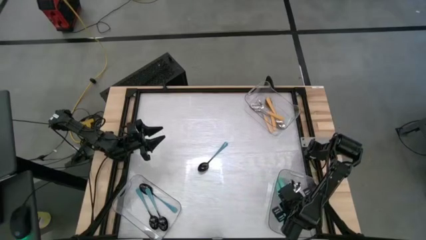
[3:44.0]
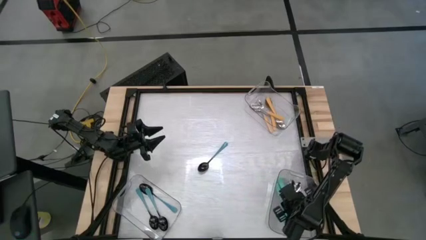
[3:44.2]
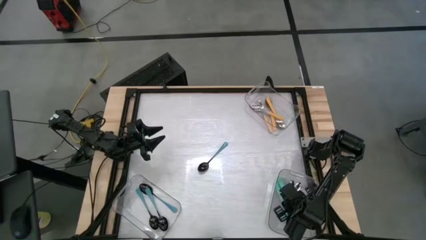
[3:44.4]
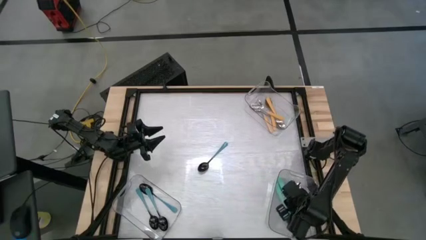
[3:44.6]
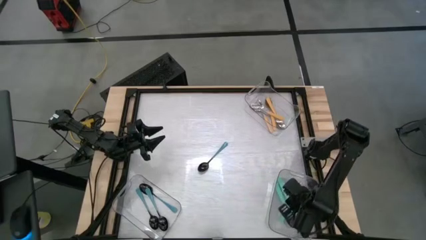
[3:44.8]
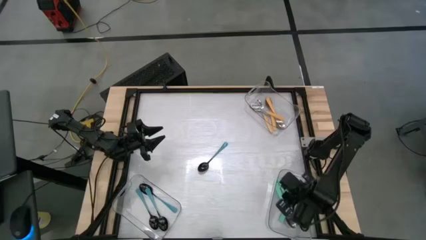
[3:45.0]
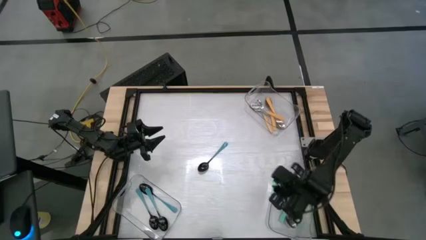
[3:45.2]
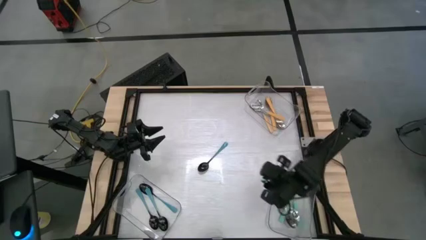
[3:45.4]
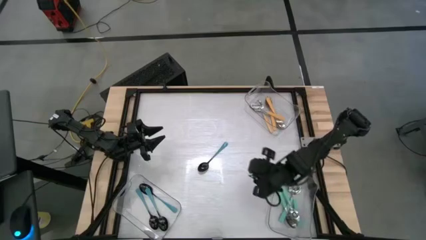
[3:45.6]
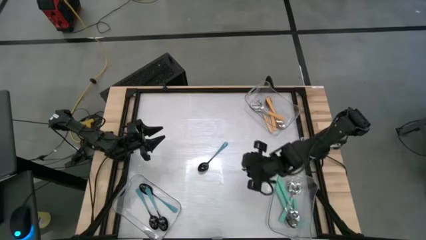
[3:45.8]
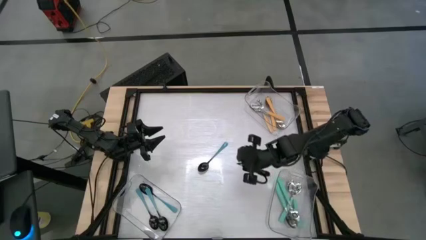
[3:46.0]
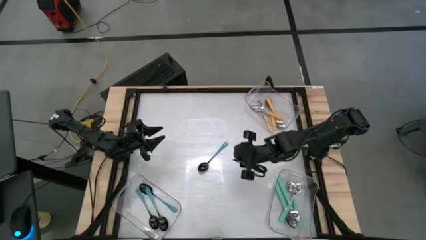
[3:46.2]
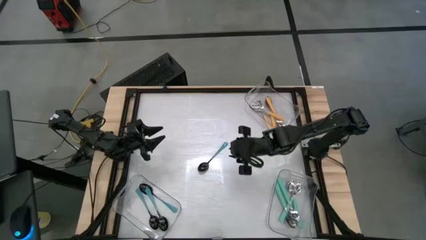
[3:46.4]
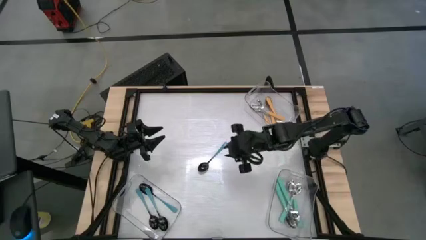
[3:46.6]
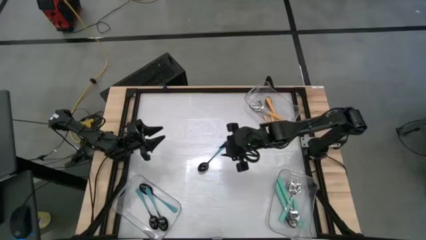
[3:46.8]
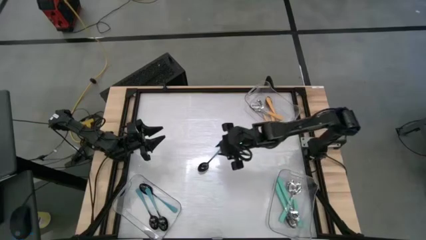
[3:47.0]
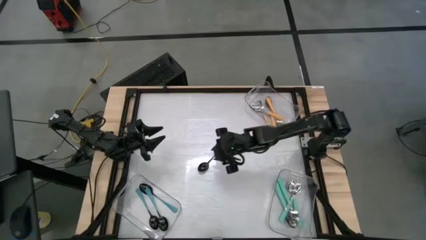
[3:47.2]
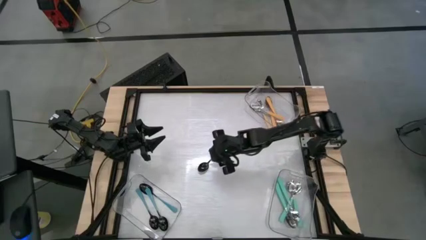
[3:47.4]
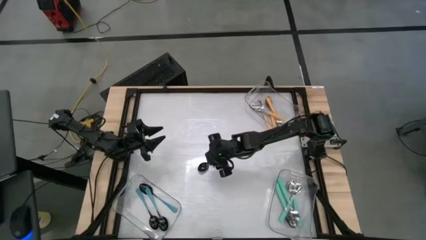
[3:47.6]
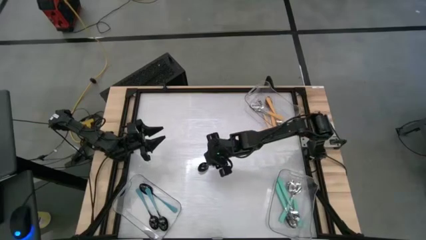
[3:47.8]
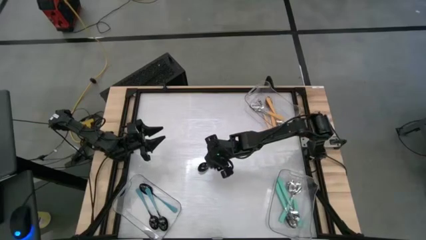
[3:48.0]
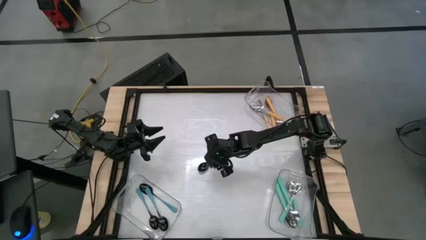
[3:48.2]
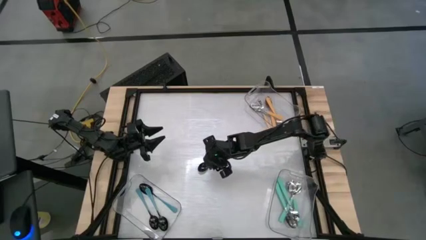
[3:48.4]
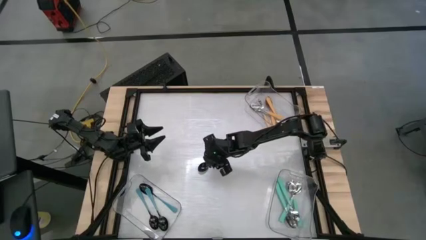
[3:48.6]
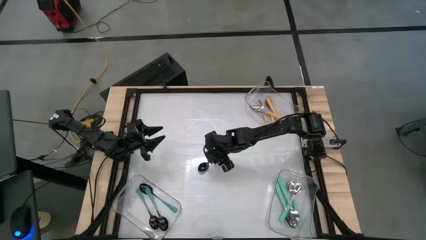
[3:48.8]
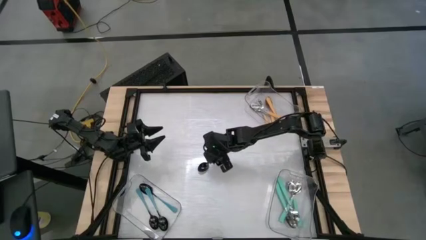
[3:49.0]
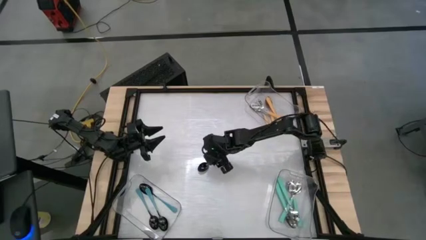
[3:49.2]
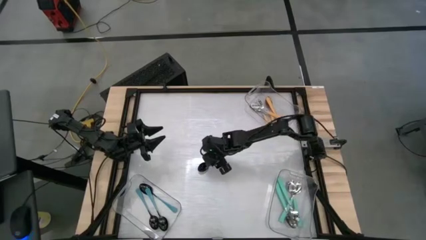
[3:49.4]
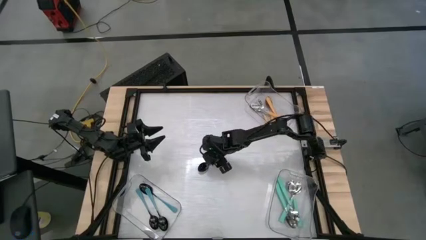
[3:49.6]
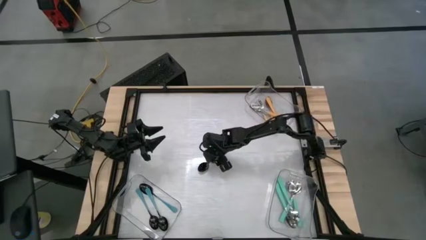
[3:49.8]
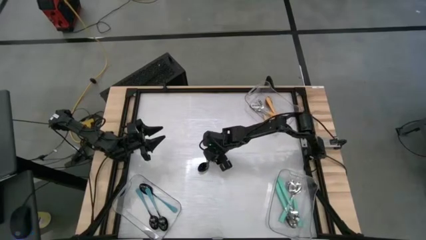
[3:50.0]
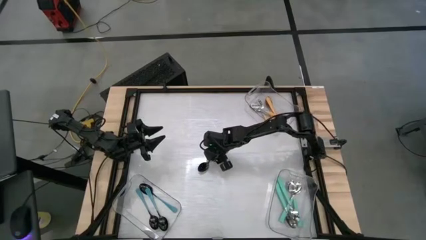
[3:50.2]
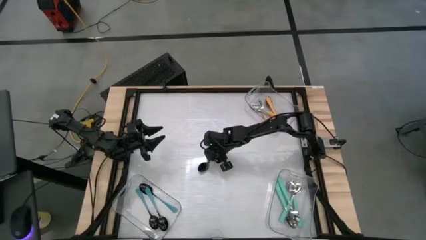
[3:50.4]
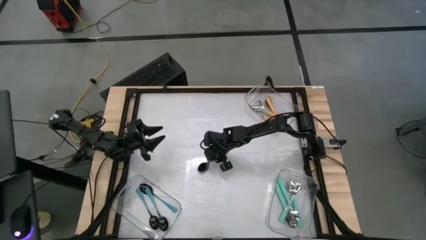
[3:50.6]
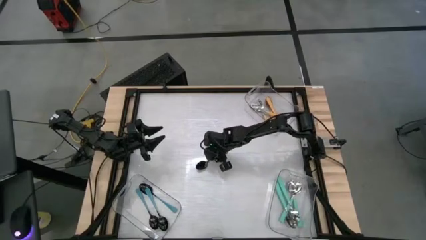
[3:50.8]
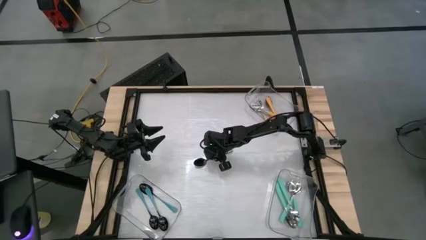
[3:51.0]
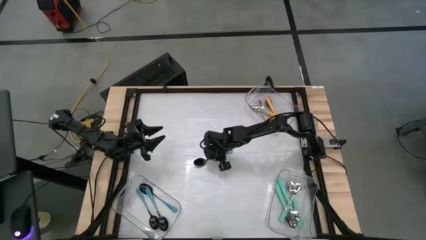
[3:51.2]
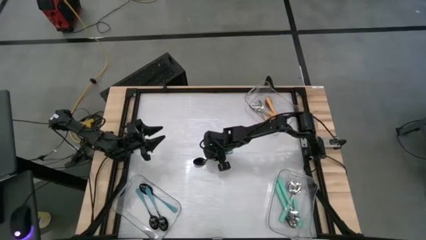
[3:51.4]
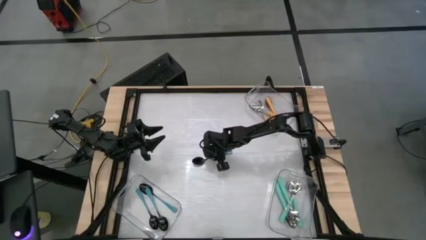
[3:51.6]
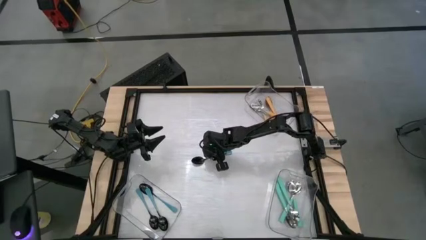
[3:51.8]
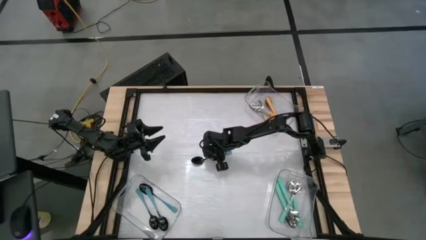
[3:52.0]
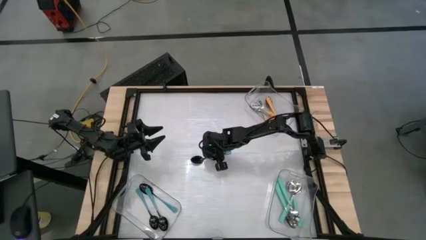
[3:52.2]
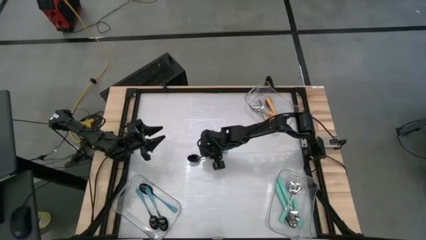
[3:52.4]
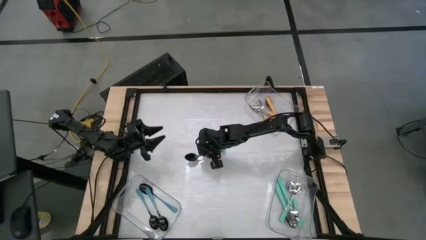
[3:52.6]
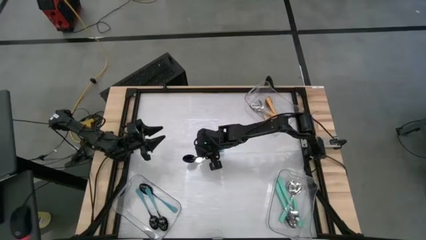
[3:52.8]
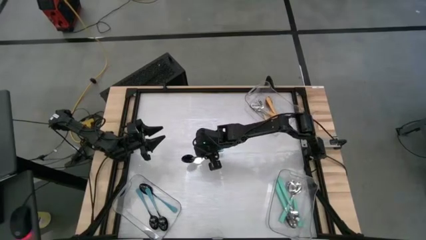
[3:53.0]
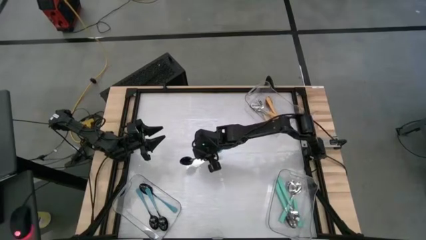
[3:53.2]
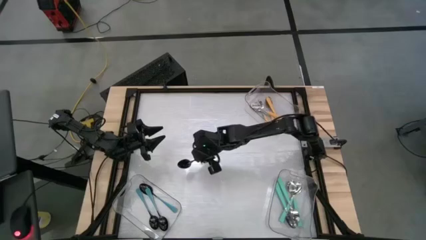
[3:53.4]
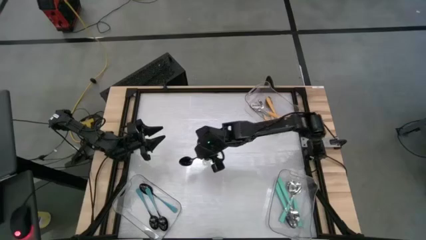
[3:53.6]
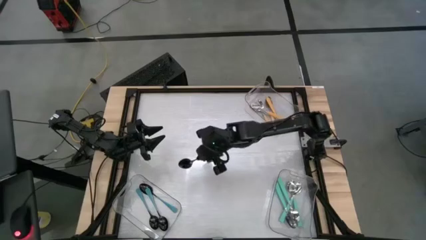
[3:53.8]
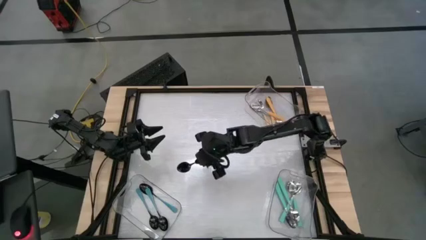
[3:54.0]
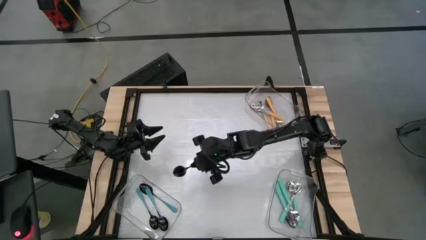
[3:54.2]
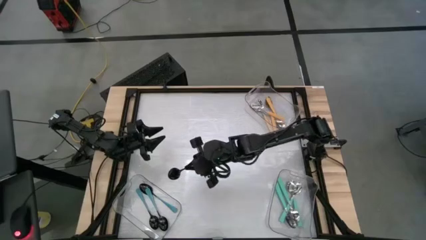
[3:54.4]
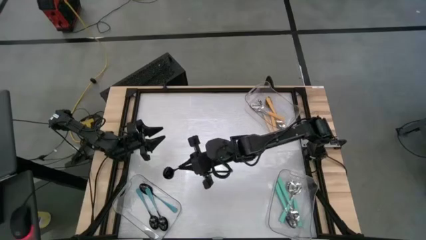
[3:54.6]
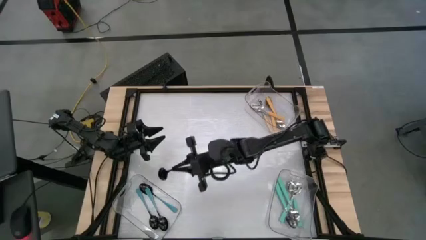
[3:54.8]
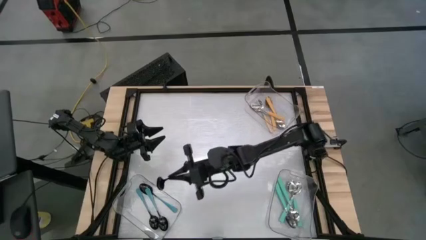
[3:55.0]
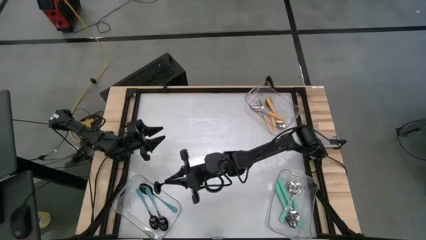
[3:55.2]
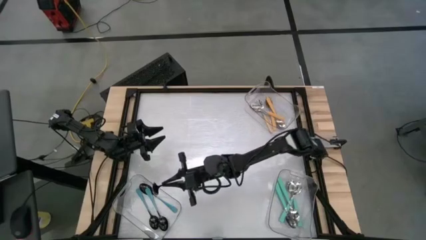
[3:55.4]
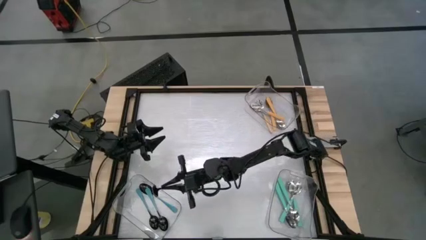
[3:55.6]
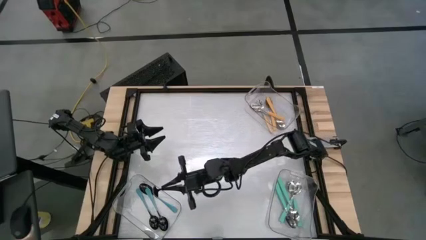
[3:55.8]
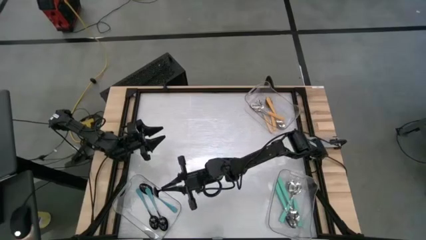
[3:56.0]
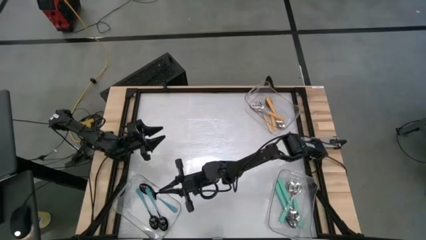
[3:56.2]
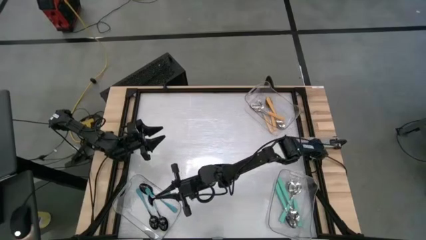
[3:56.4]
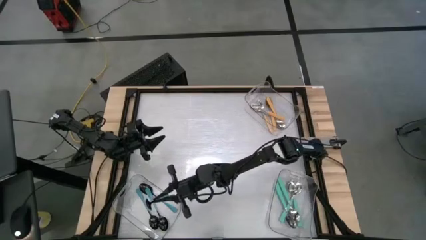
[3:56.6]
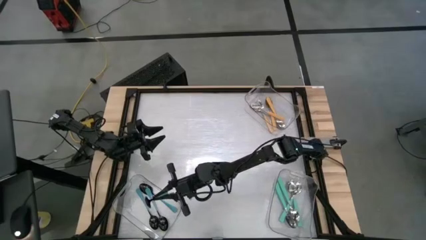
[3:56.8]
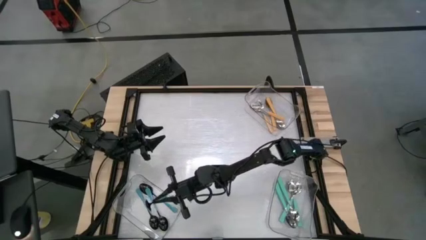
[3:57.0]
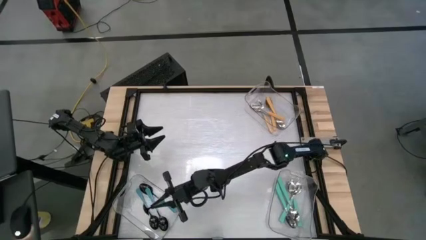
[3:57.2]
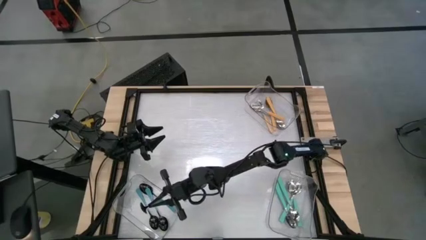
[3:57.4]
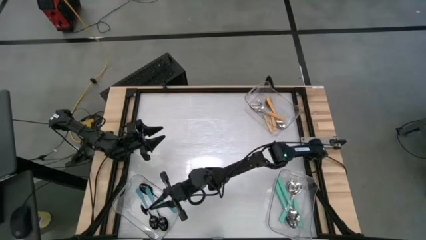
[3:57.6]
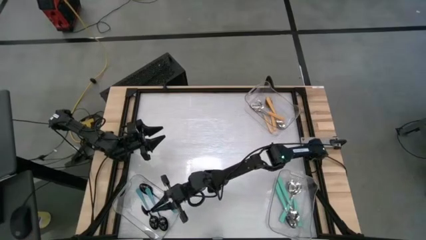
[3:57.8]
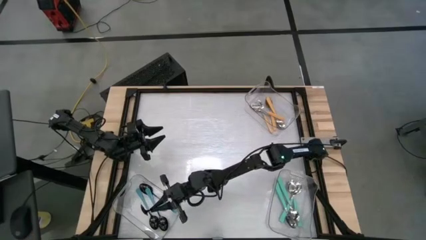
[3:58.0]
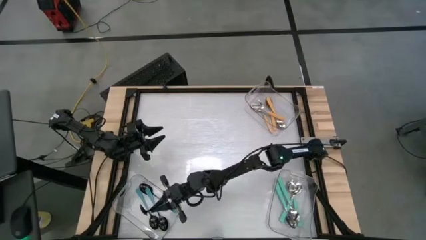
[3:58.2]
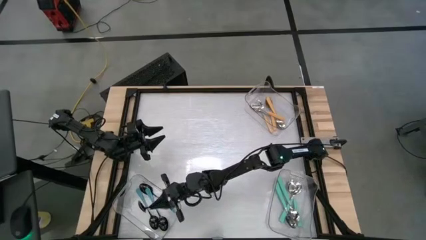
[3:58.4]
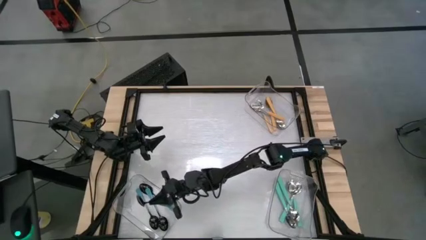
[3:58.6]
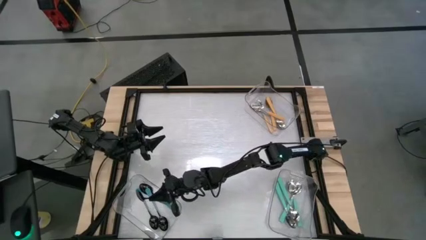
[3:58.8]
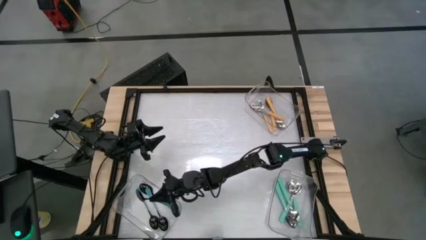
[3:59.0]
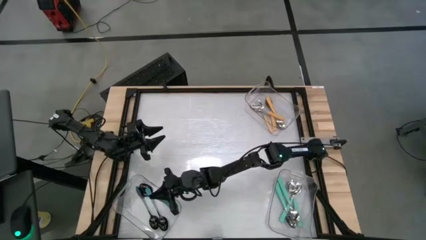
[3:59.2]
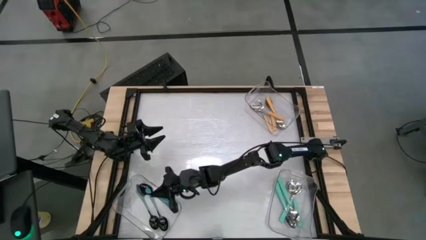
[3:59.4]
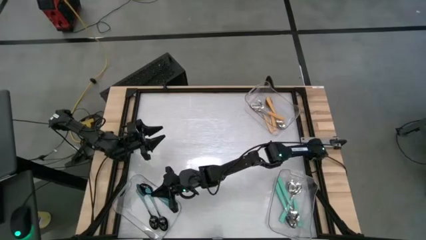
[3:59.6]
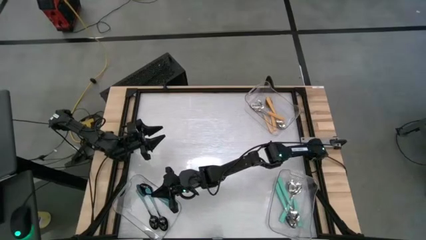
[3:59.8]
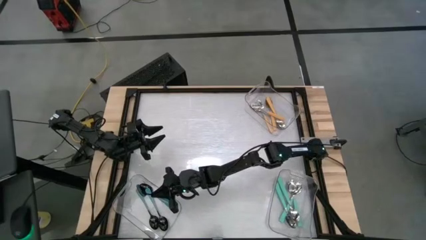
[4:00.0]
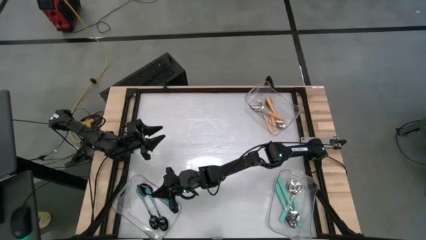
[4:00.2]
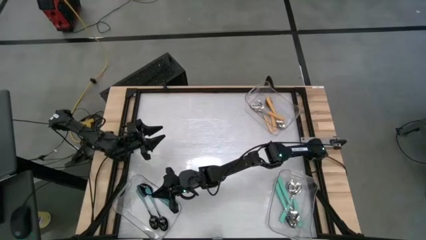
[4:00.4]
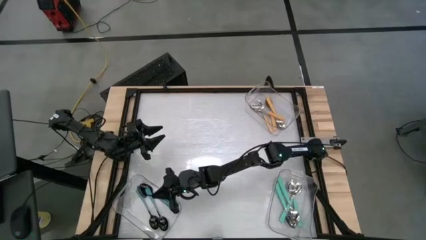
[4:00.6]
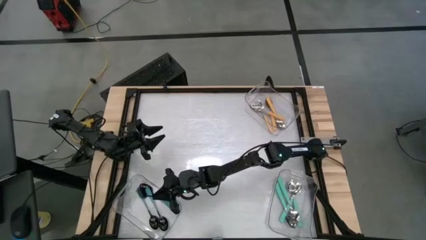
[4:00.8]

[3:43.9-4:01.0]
Task: Sort silverware by color (type)
Put the blue spoon into the bottom left transparent bin
